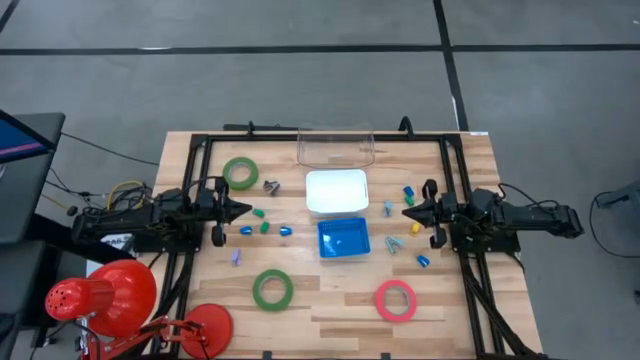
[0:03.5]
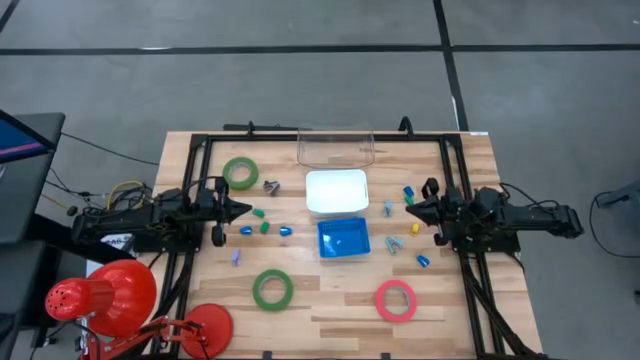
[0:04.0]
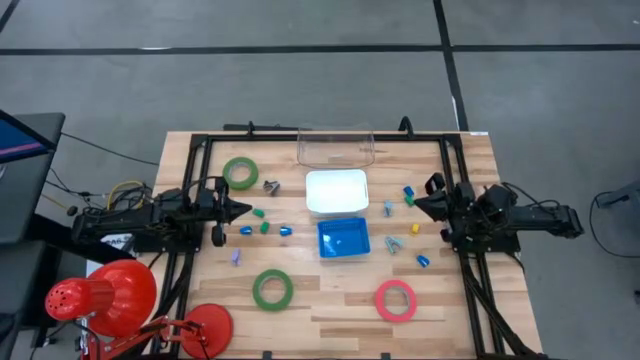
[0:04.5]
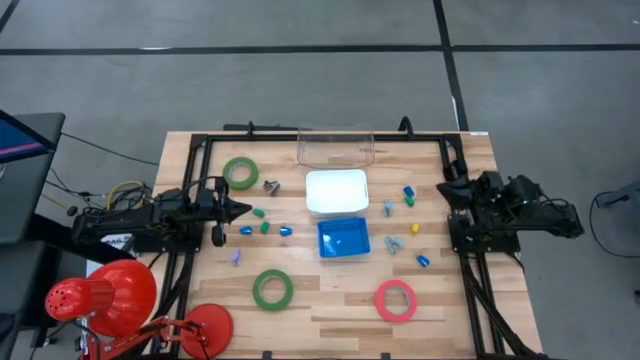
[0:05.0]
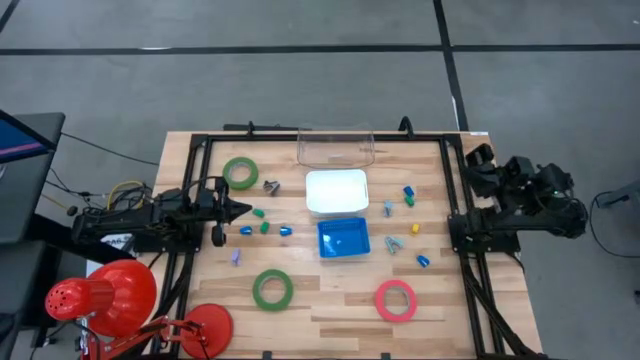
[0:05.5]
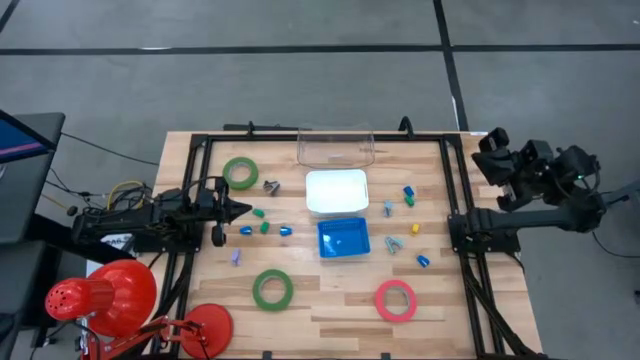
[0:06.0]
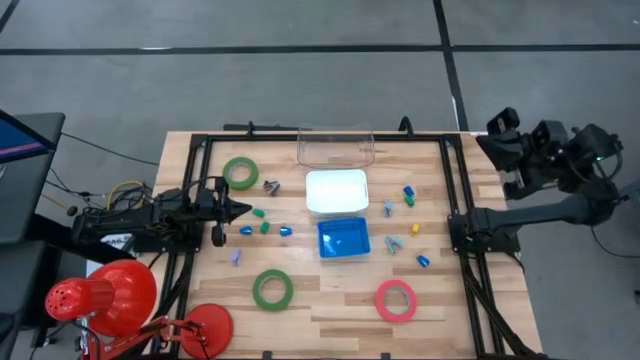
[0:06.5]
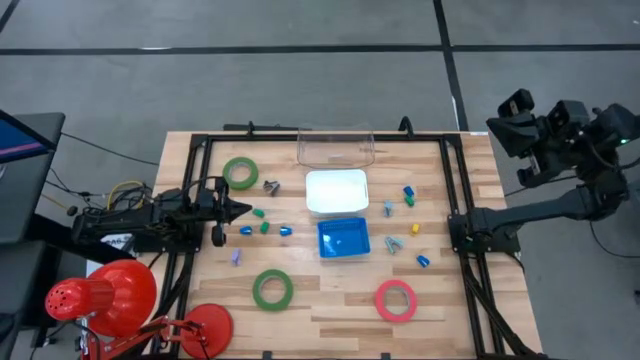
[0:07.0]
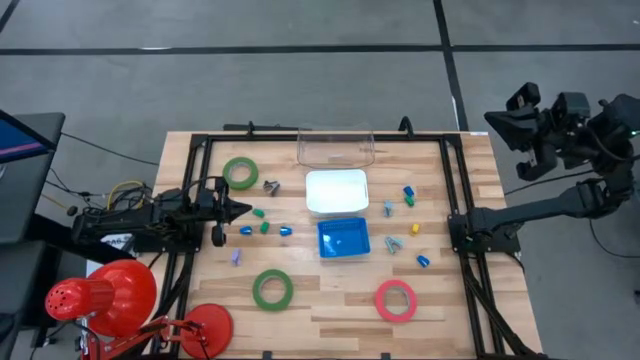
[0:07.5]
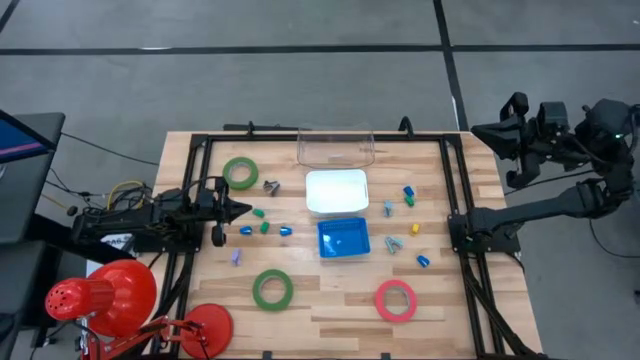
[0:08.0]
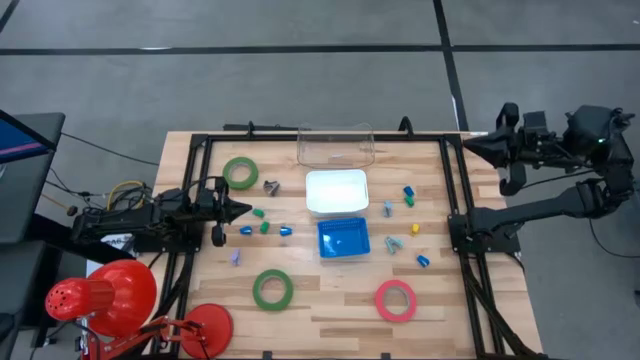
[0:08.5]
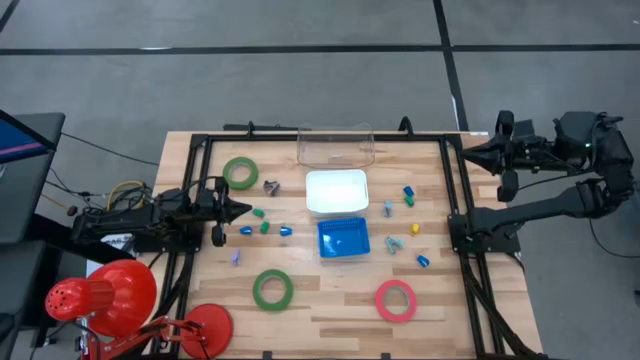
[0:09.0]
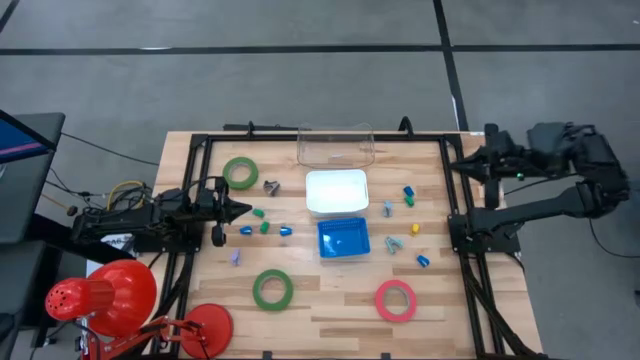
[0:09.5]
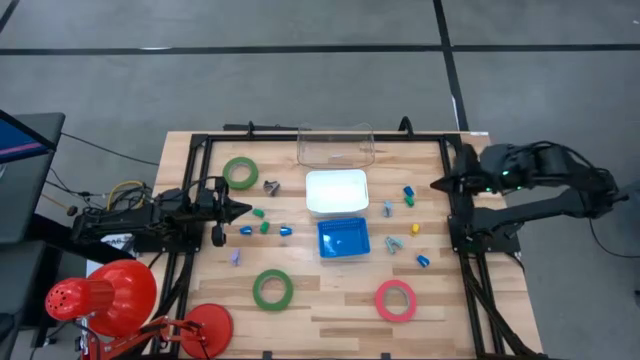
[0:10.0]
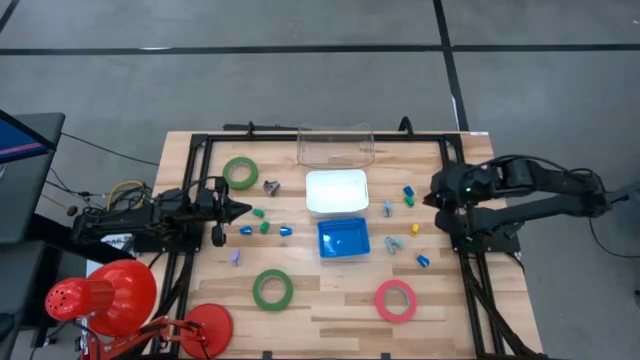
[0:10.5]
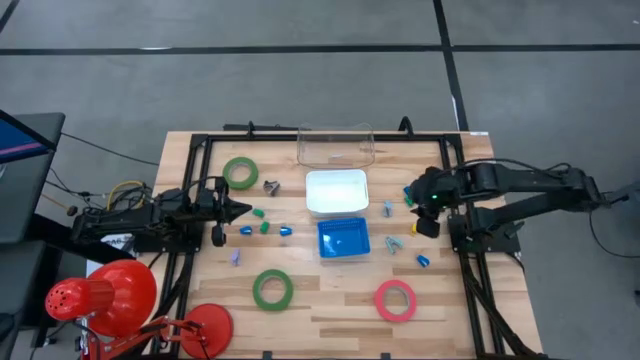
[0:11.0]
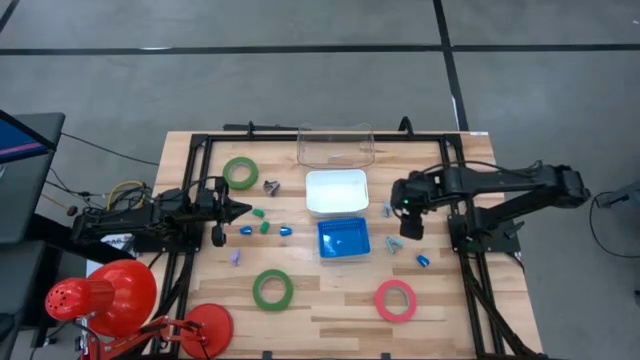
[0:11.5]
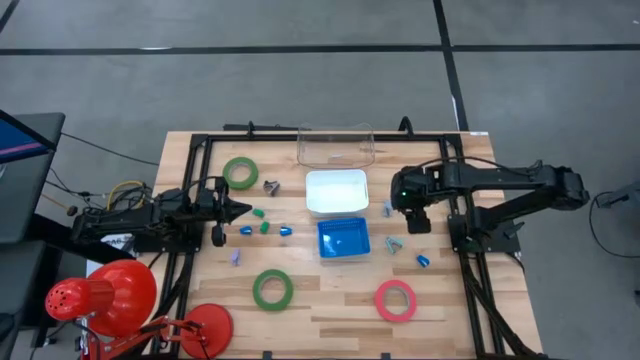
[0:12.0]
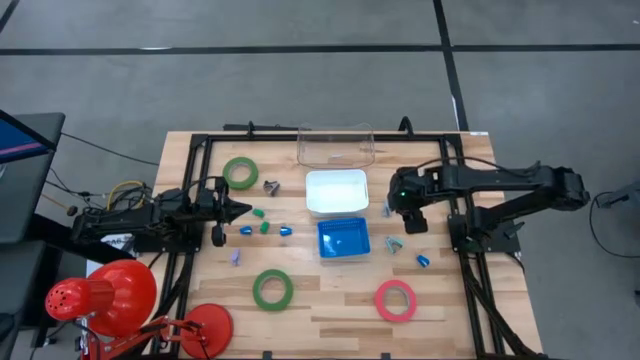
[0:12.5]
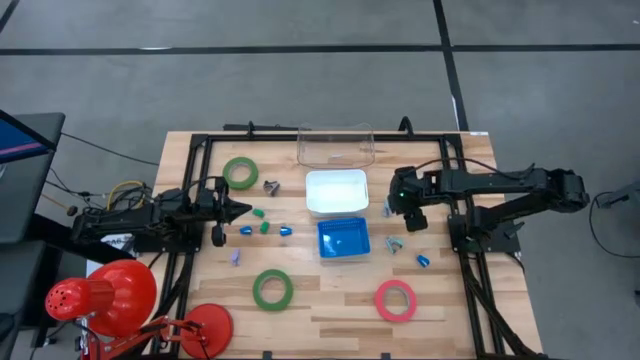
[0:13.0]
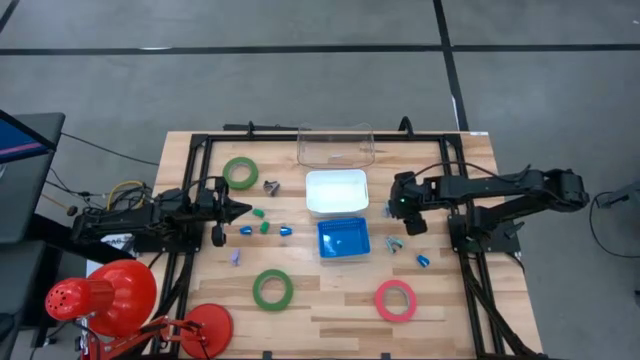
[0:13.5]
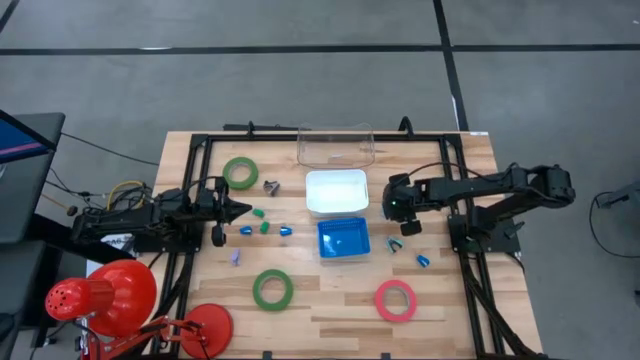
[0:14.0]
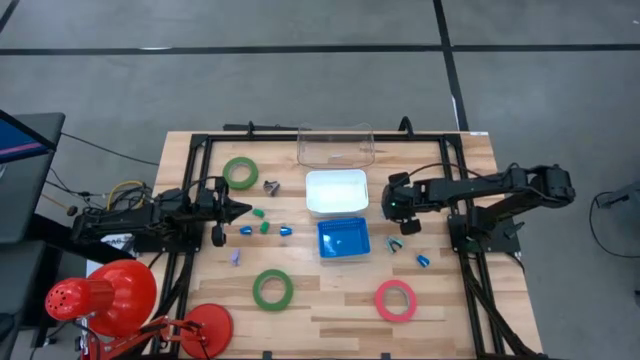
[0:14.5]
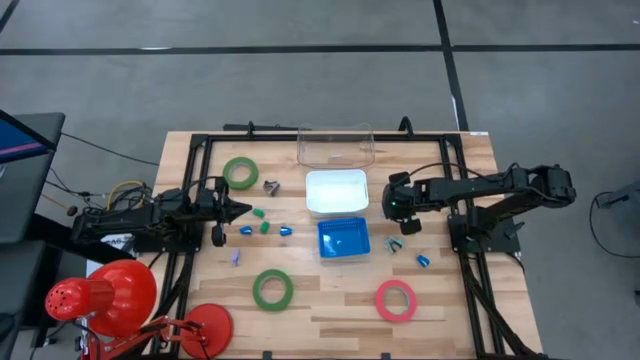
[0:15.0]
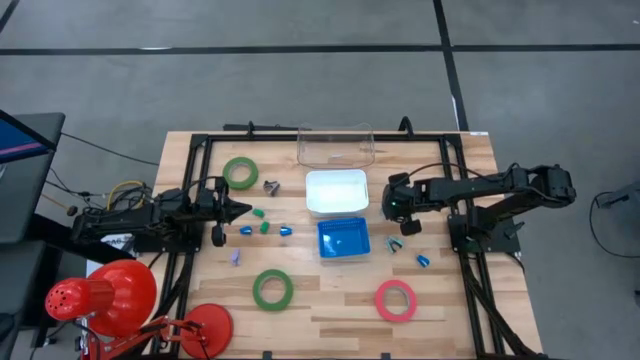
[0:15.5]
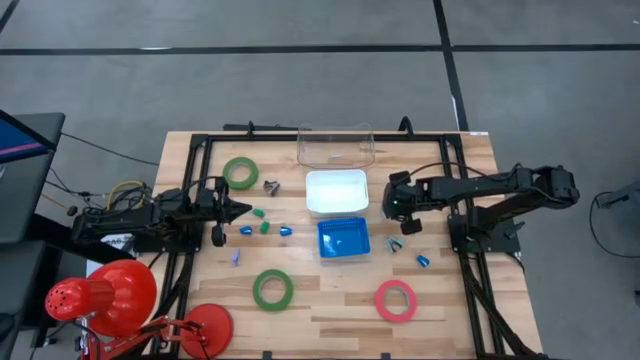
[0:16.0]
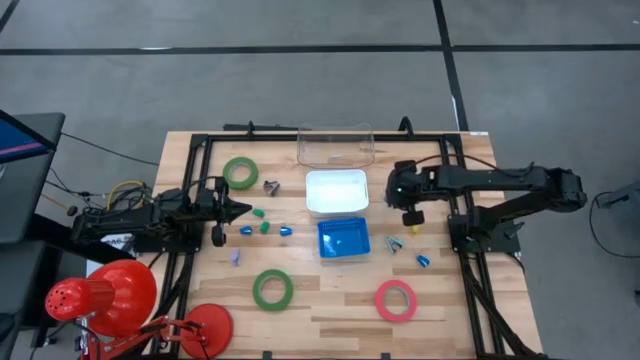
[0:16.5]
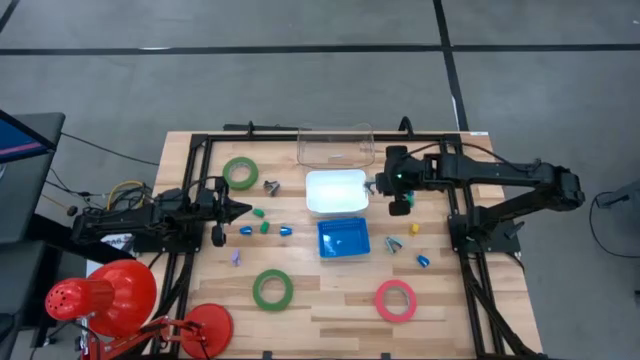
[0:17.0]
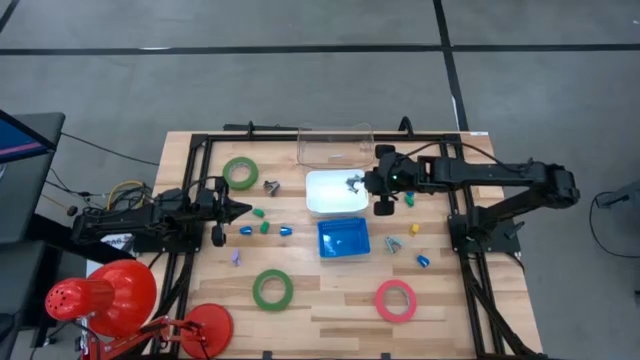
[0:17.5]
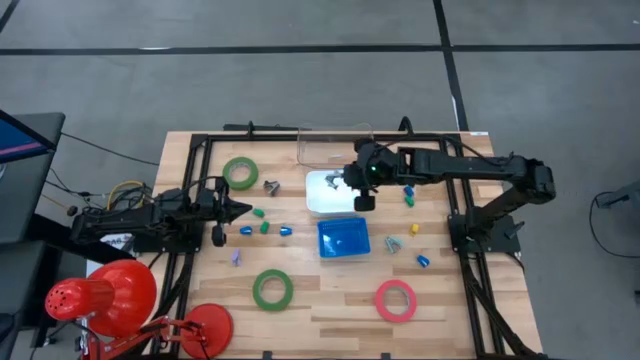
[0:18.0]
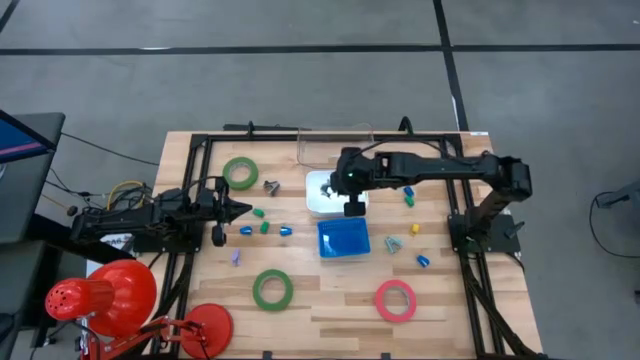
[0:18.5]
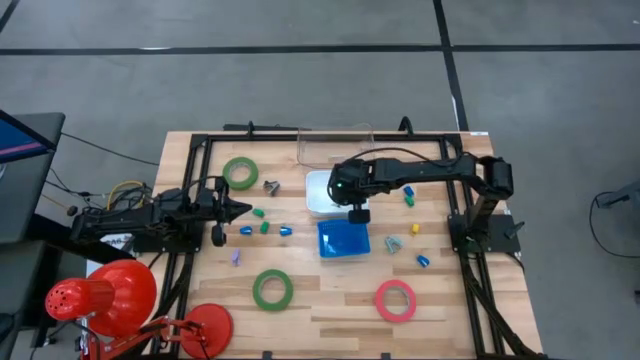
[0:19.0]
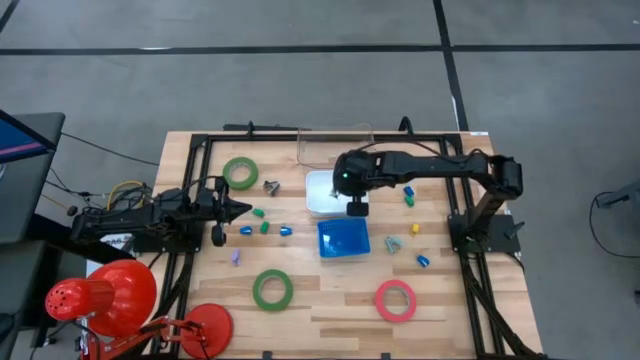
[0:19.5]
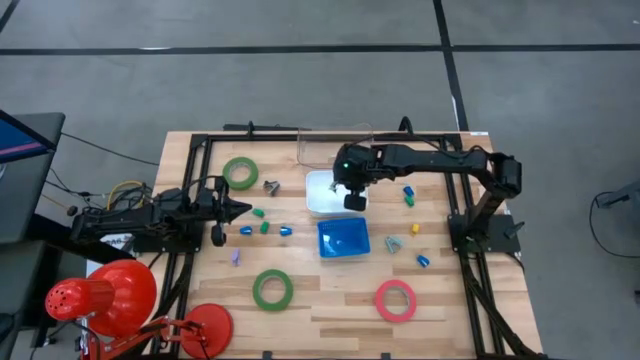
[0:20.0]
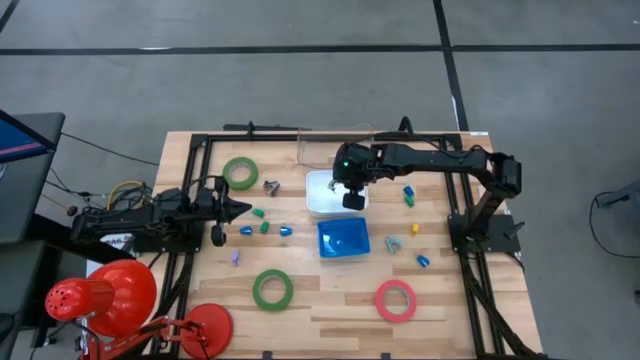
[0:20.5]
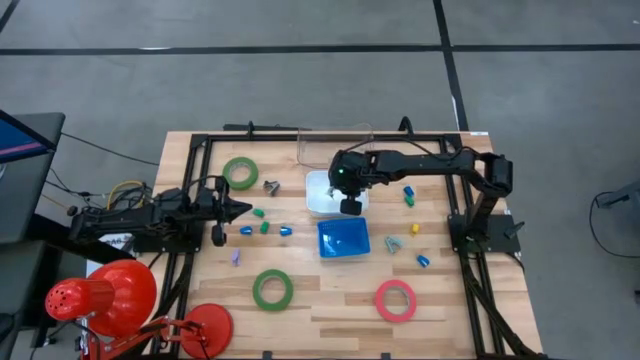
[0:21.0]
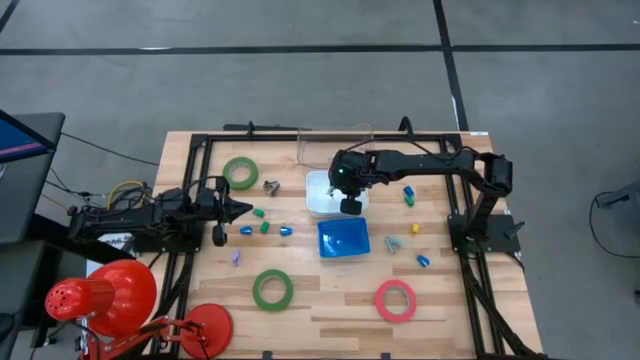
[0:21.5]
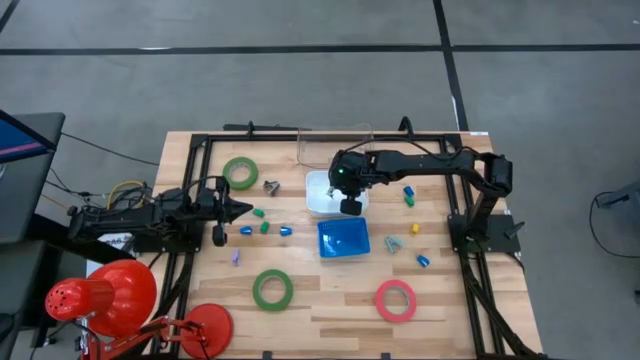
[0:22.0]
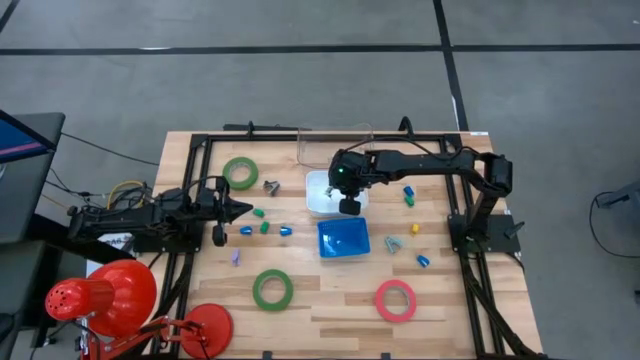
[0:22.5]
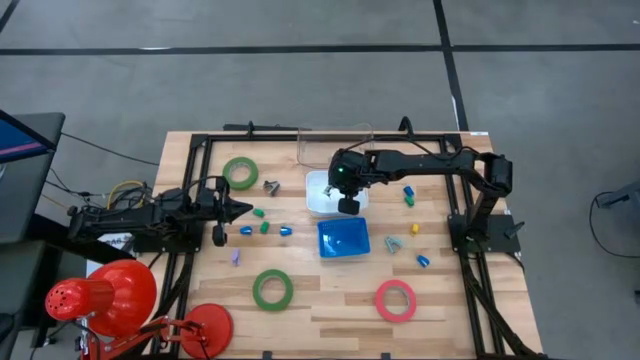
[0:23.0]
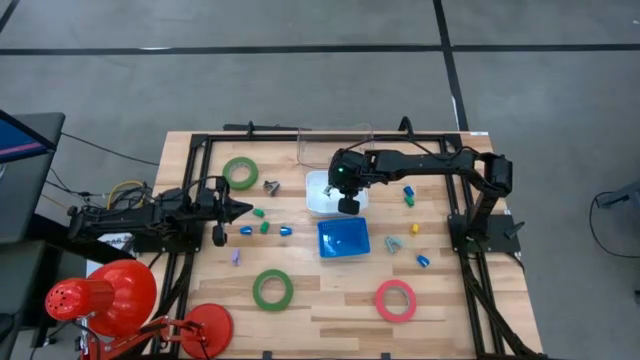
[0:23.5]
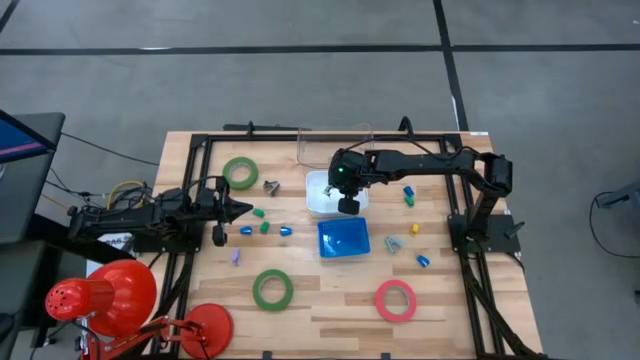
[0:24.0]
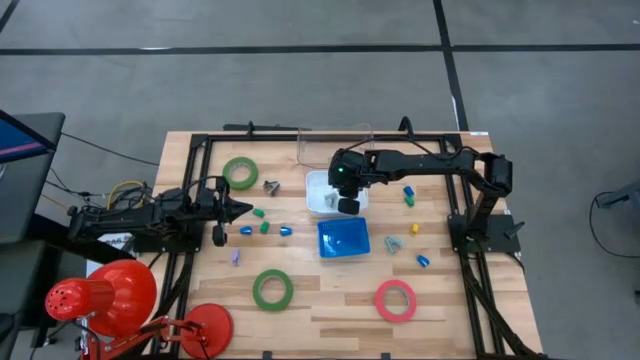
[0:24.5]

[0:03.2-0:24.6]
Task: Pick and place Stapler, Stapler remover, tape
Put the gray staple remover into the white bin
